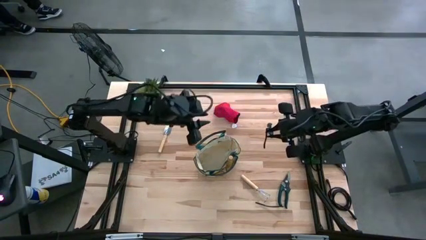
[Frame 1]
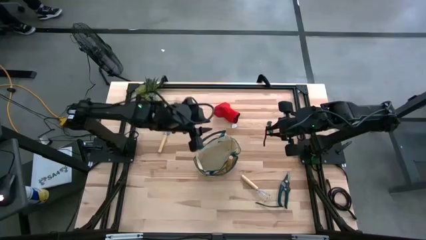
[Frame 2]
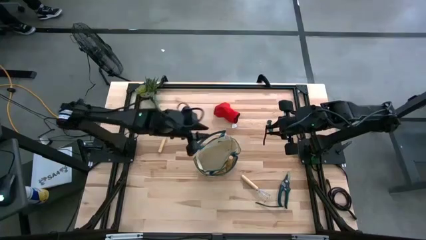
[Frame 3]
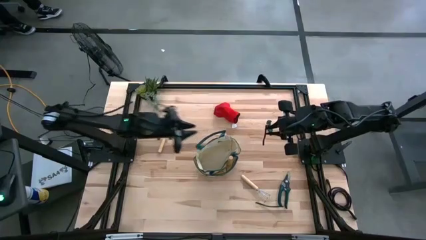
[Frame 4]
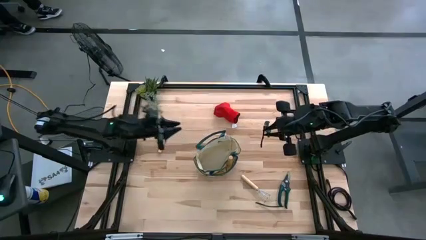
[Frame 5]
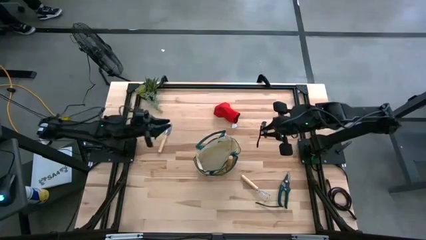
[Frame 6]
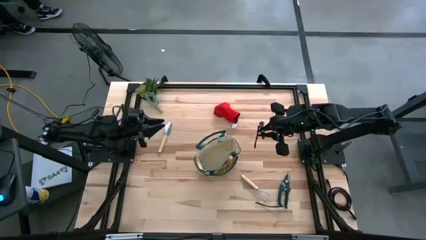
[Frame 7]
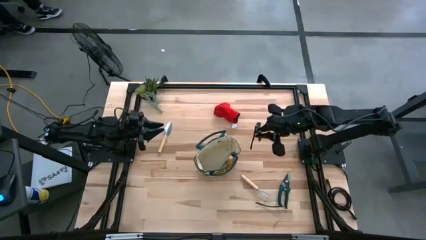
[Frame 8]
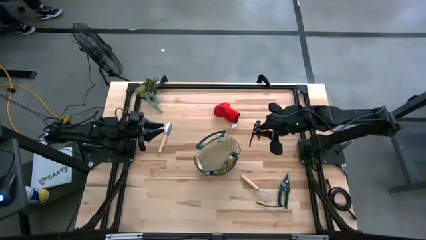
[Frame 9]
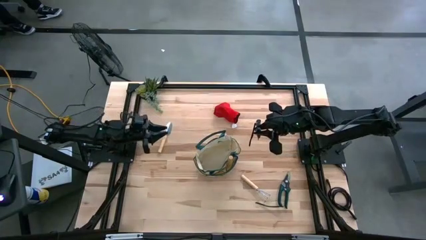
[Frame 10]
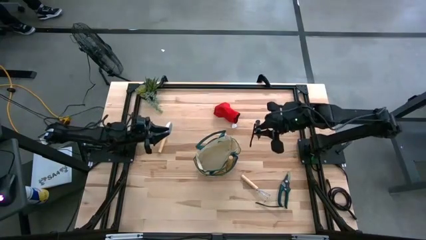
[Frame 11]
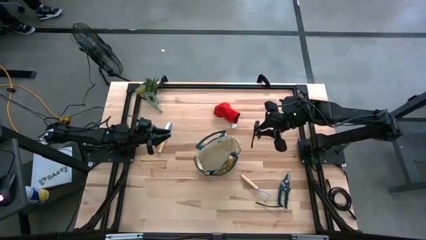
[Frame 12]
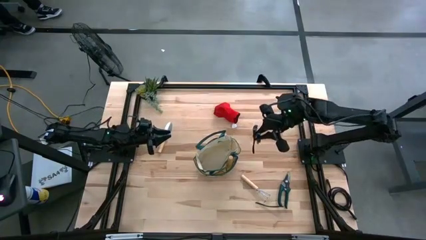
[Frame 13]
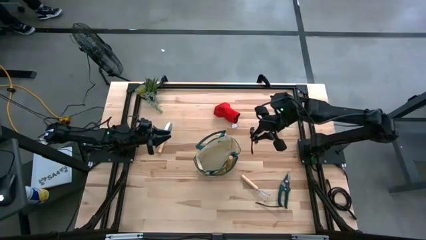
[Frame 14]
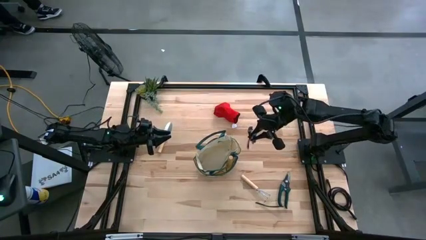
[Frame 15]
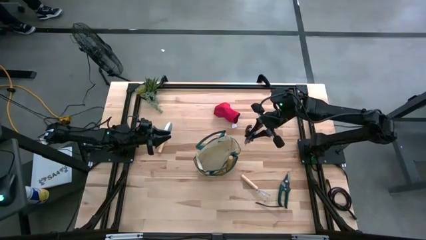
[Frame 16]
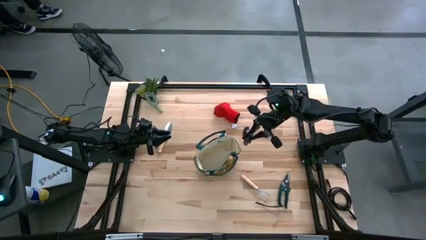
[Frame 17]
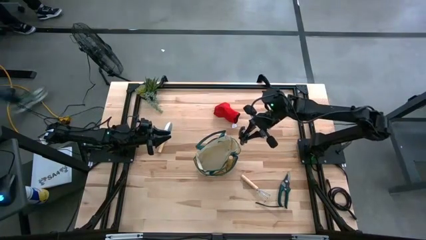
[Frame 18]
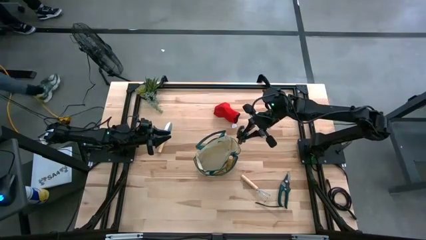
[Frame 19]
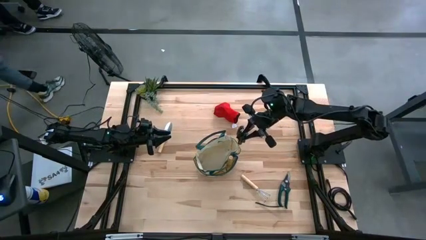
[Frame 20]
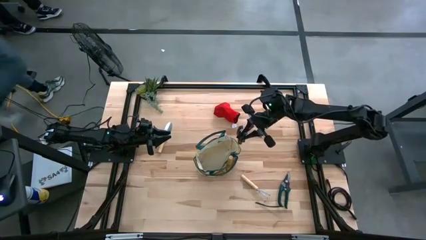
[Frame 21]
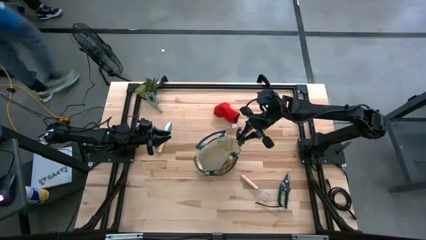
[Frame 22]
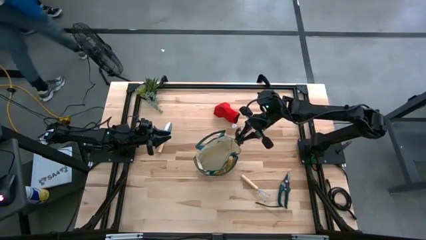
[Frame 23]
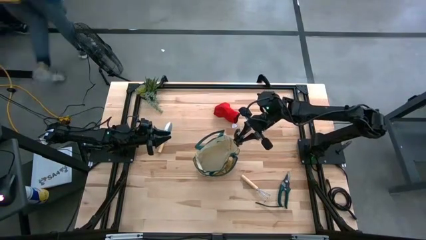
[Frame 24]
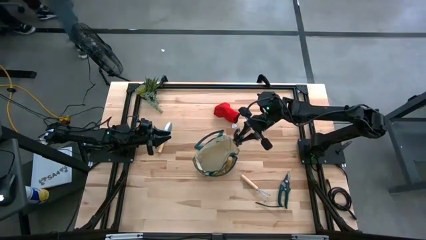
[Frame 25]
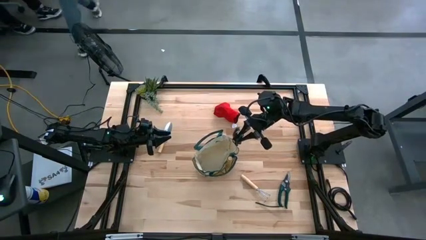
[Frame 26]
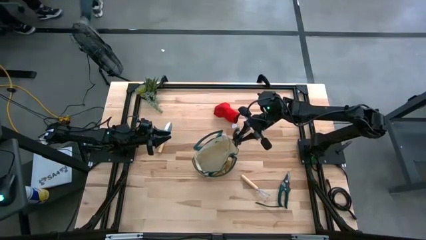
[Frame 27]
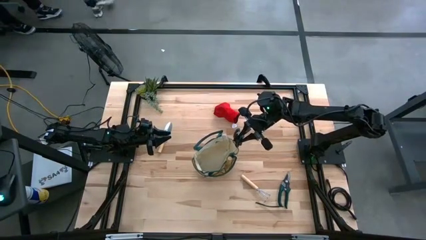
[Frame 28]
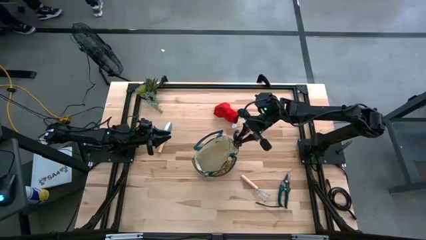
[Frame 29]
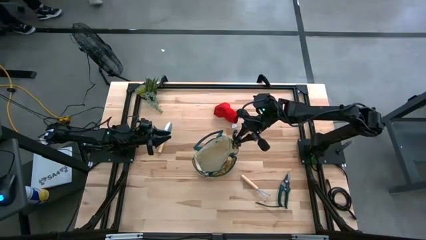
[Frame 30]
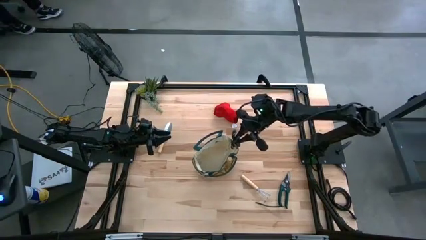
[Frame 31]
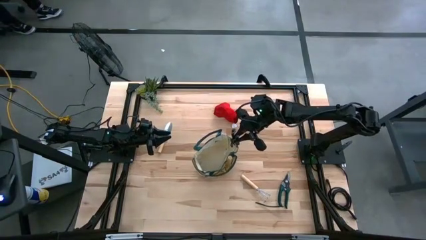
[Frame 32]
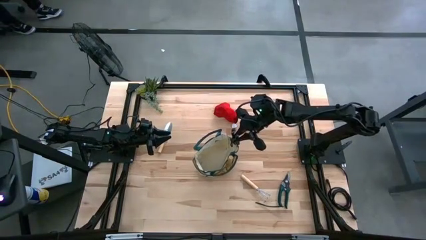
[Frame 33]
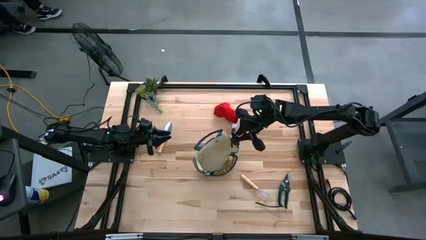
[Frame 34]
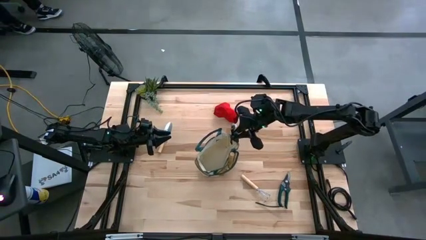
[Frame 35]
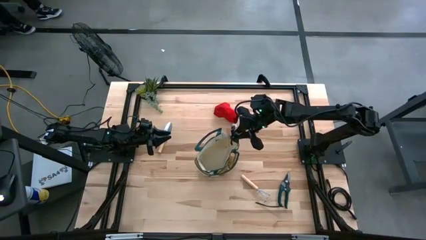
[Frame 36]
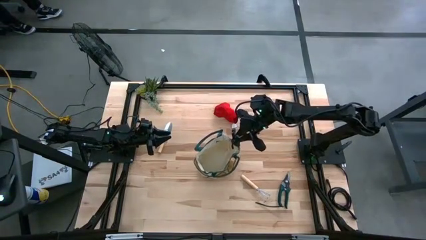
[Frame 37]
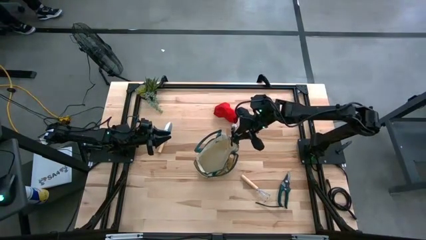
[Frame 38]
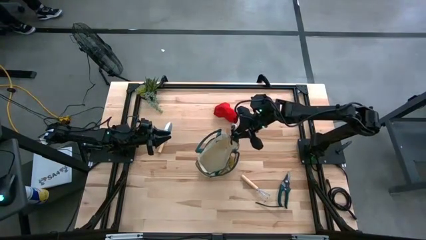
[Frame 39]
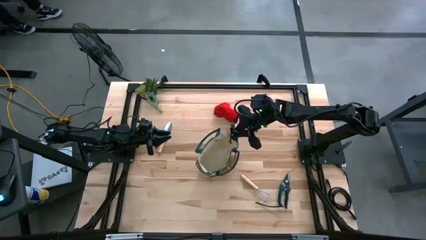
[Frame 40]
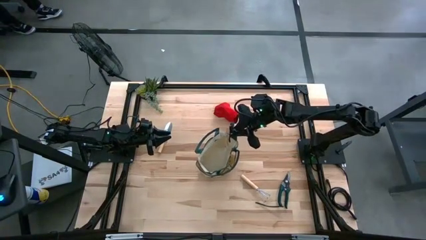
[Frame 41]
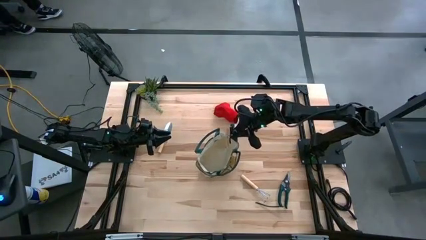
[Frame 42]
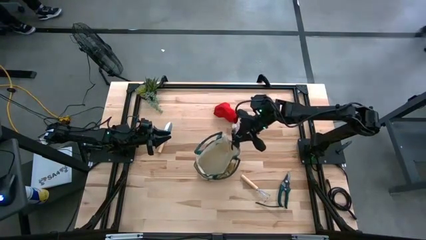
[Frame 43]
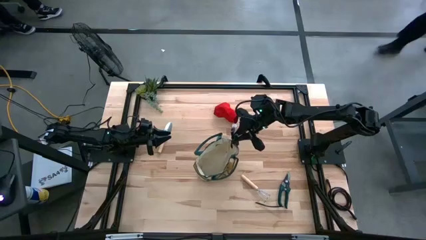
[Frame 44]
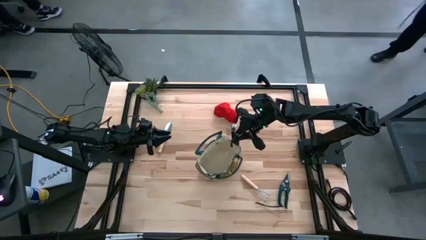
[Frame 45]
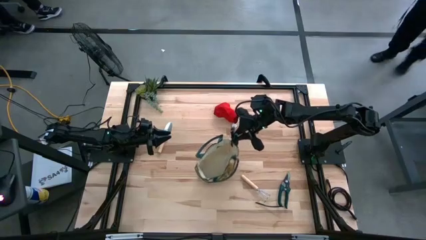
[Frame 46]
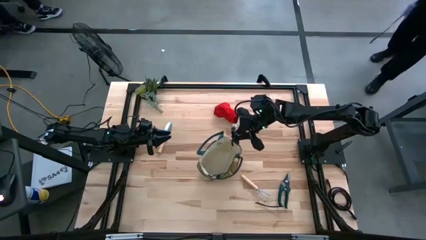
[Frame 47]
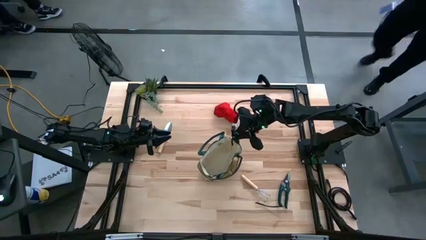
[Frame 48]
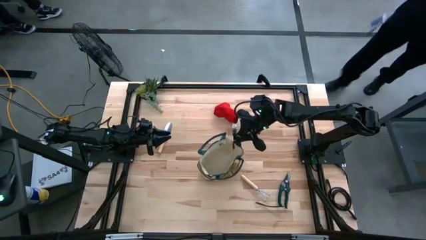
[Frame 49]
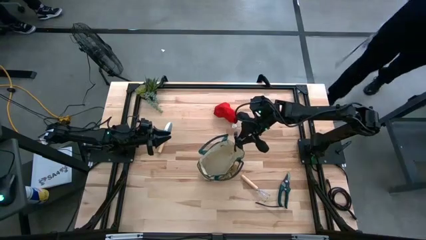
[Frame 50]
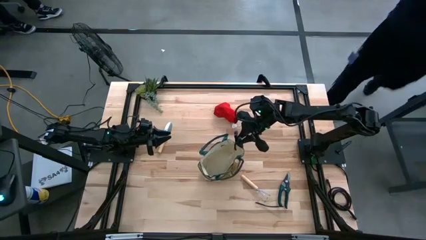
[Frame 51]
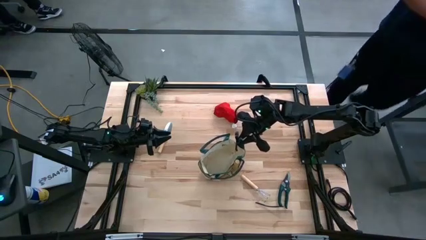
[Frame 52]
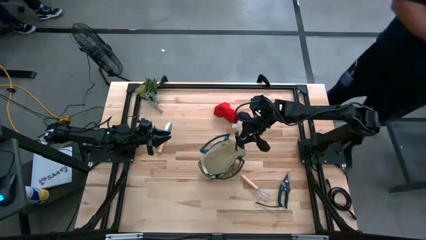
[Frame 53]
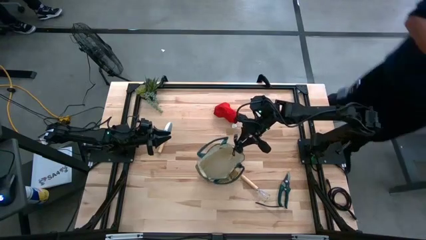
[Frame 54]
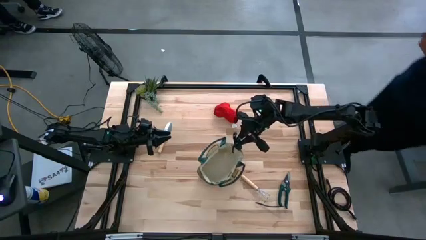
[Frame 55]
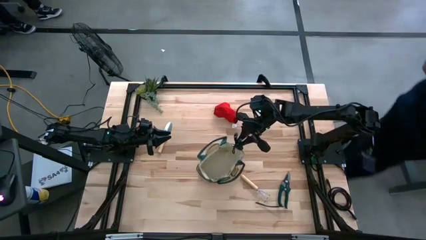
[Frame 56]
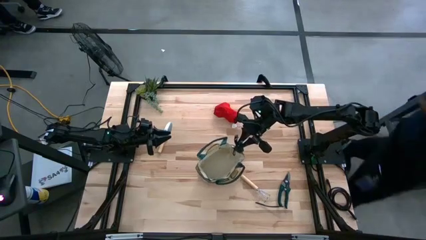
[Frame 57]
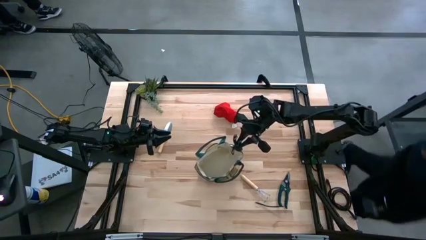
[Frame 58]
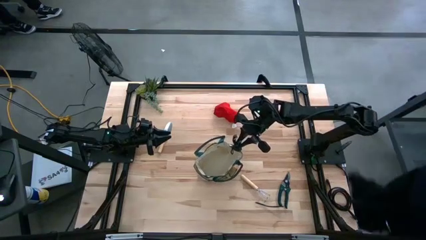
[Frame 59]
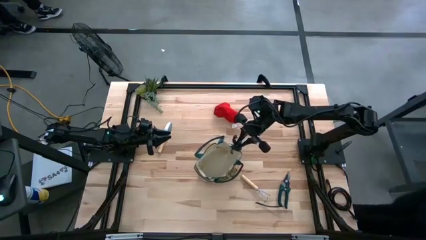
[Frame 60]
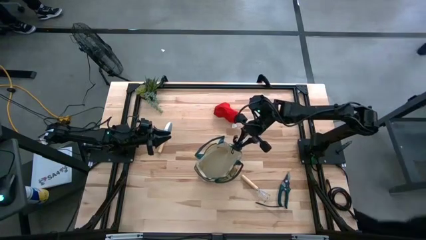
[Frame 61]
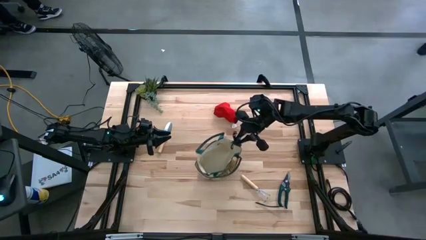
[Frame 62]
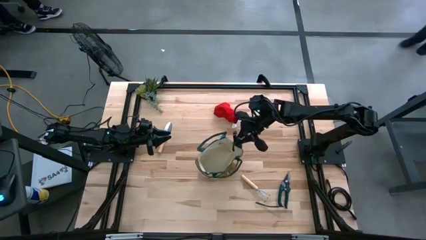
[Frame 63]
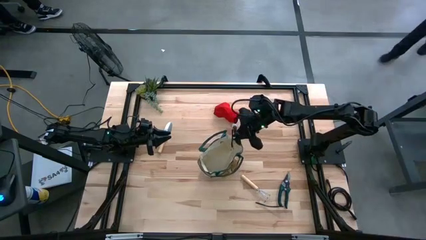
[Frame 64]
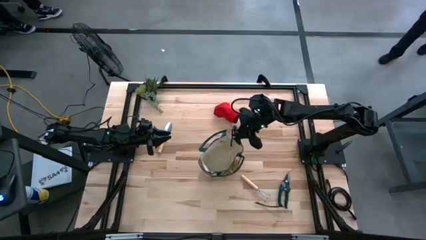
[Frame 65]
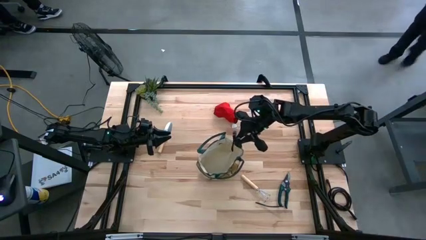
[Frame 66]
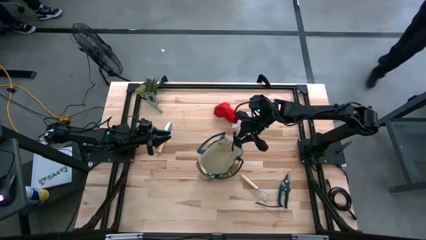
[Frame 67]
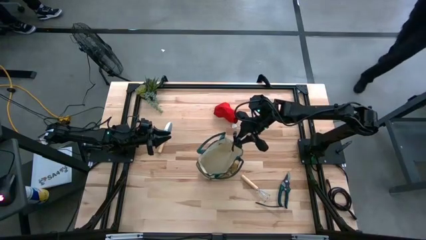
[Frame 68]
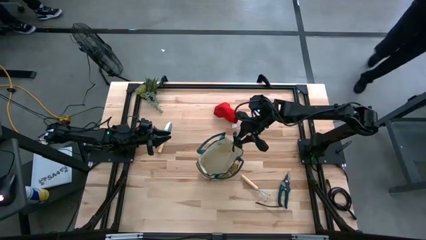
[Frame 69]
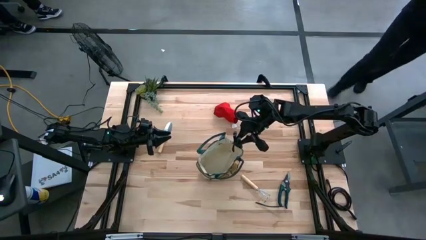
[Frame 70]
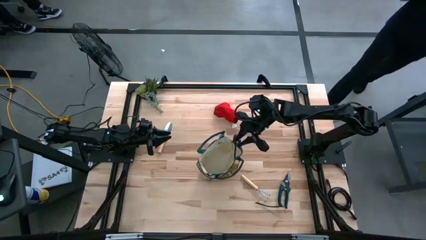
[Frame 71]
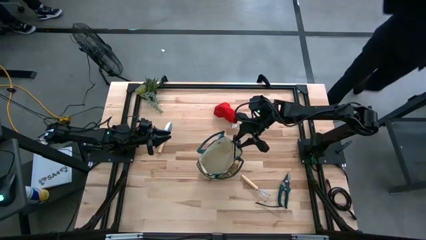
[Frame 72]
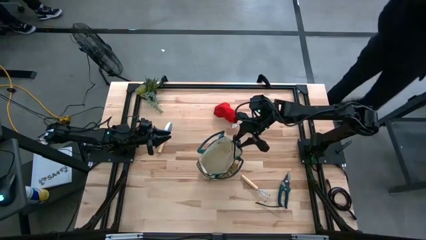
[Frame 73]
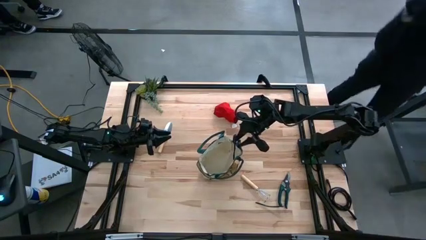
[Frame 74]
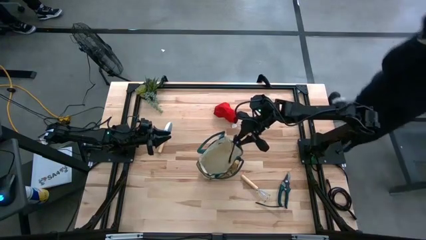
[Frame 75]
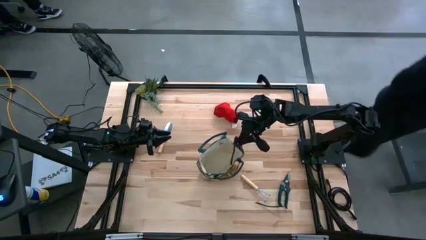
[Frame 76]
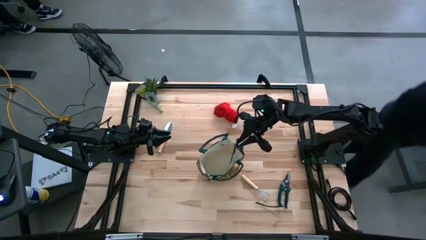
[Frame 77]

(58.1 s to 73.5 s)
Task: Pick & Place Garden tools in Gardening bag
Put the left green shear scissors into the white gardening bag
